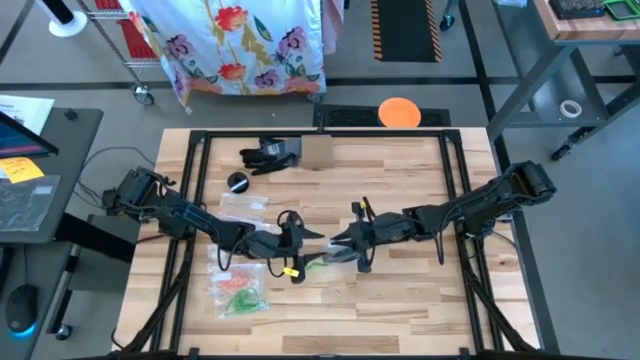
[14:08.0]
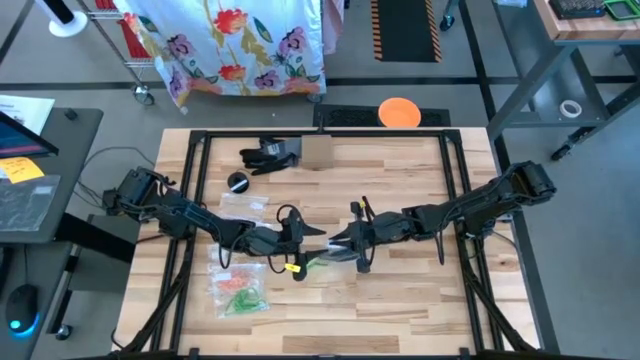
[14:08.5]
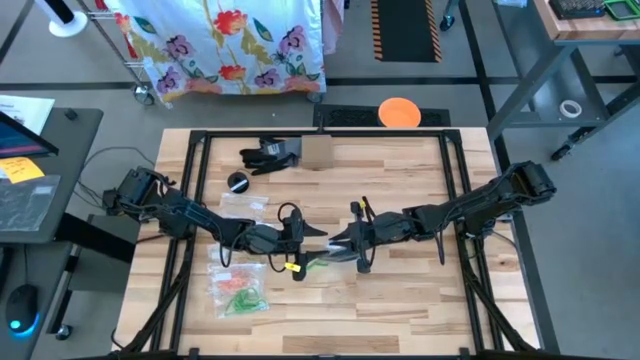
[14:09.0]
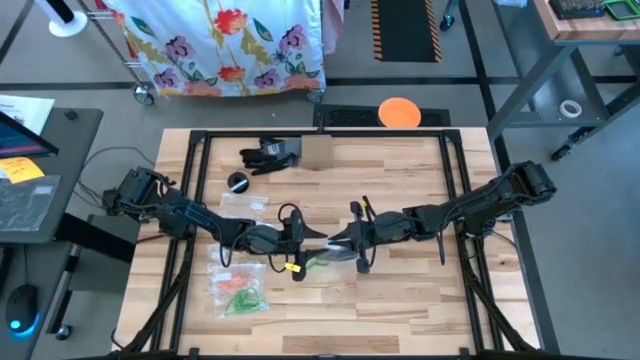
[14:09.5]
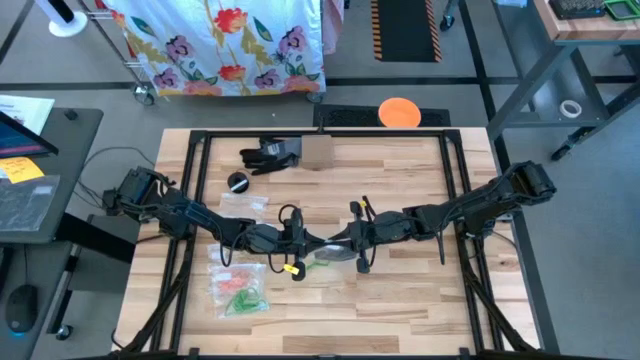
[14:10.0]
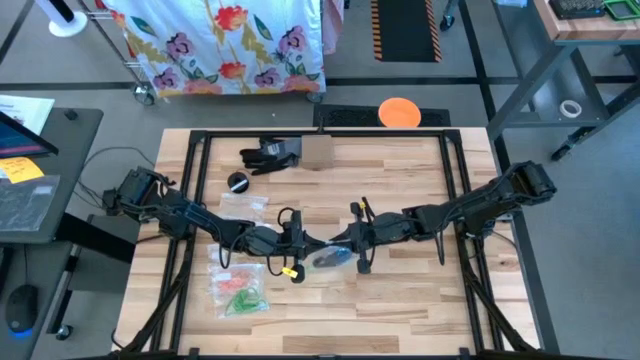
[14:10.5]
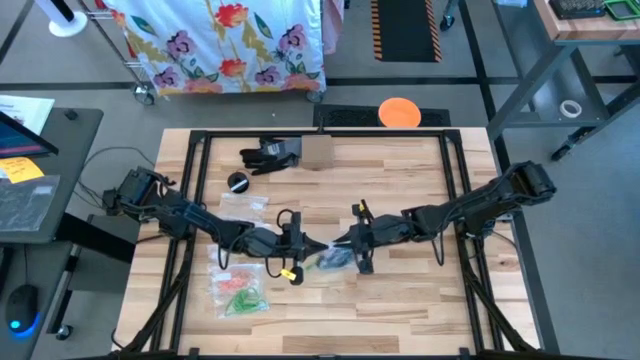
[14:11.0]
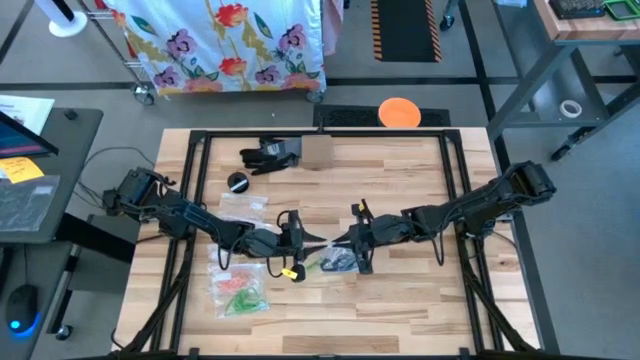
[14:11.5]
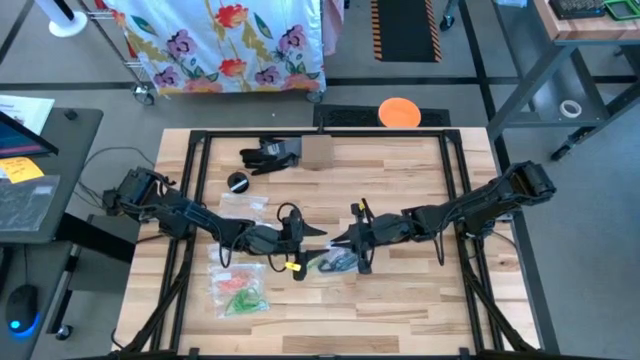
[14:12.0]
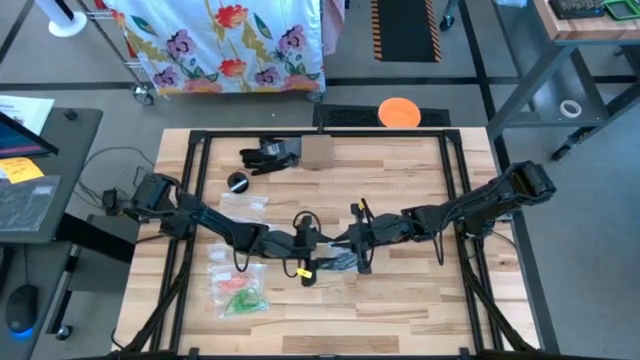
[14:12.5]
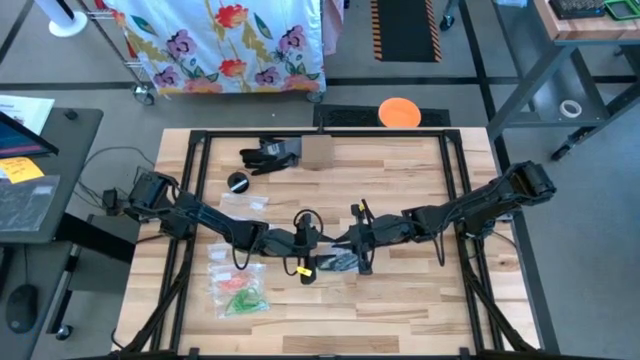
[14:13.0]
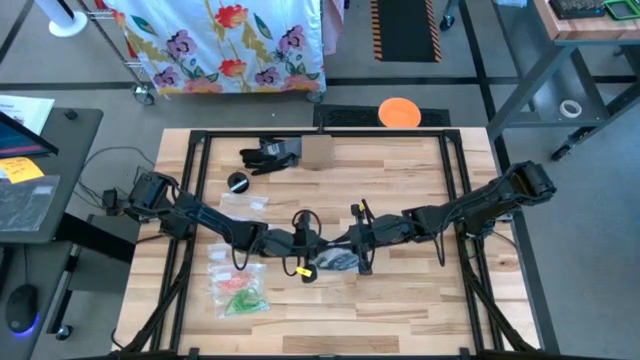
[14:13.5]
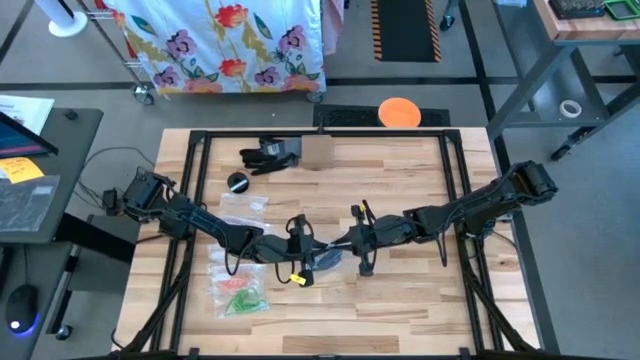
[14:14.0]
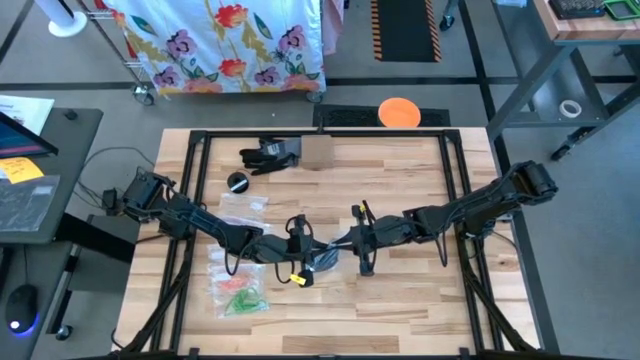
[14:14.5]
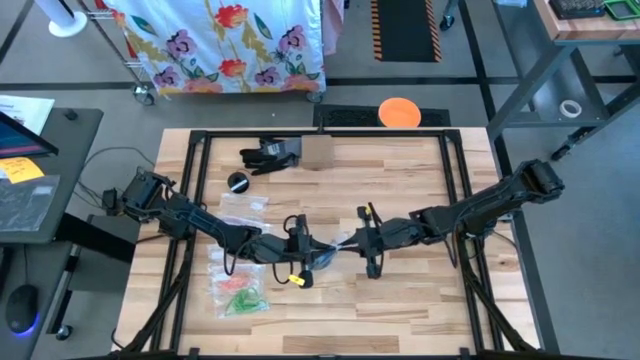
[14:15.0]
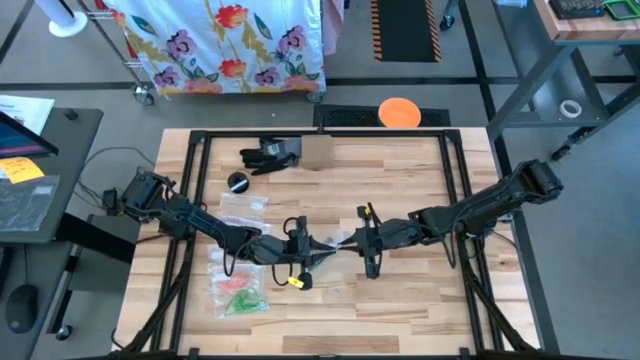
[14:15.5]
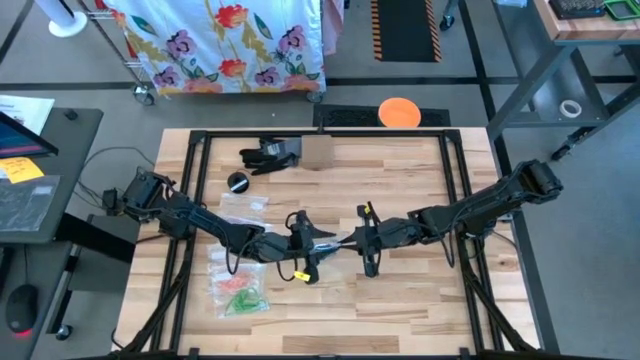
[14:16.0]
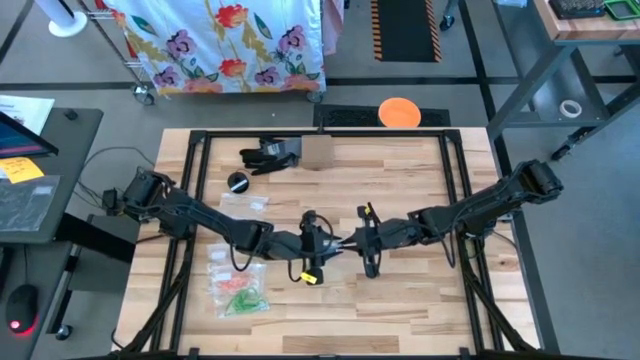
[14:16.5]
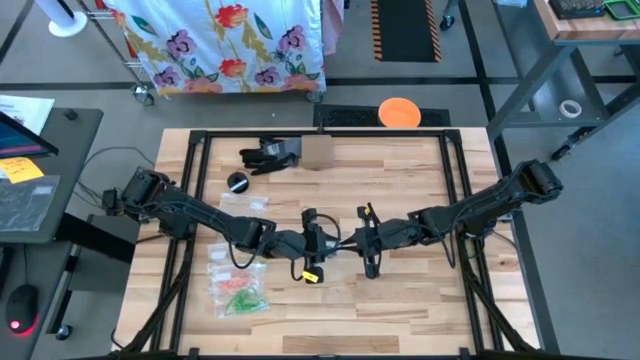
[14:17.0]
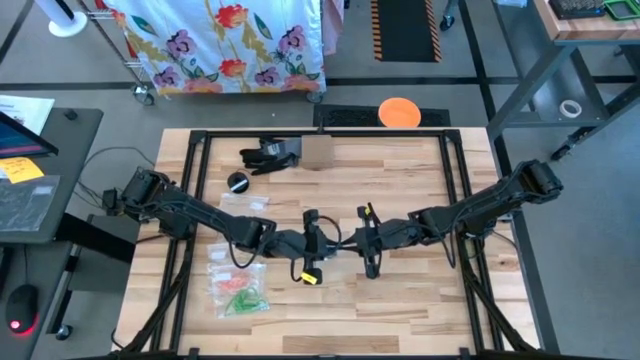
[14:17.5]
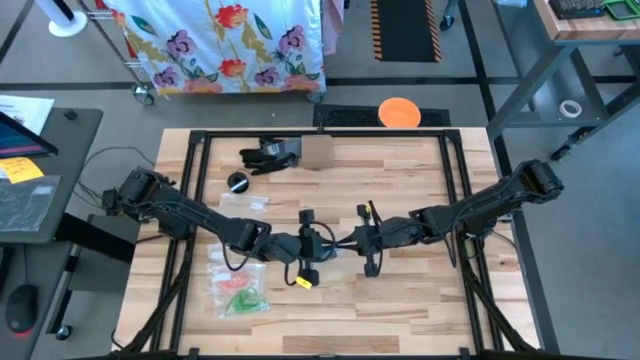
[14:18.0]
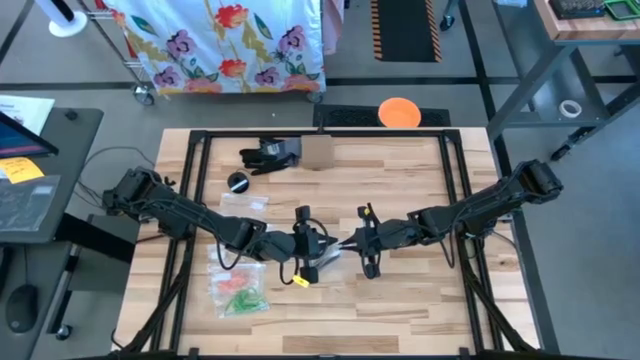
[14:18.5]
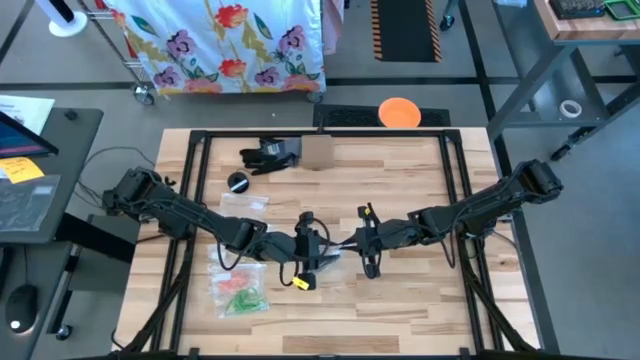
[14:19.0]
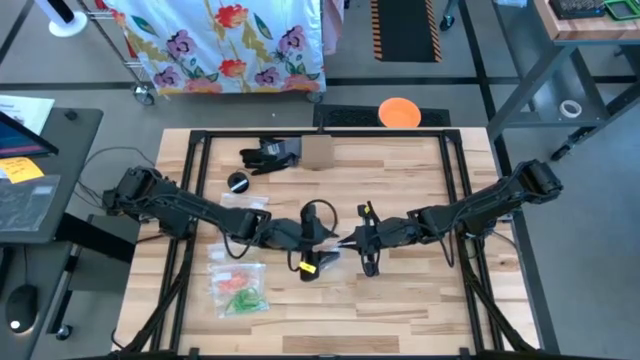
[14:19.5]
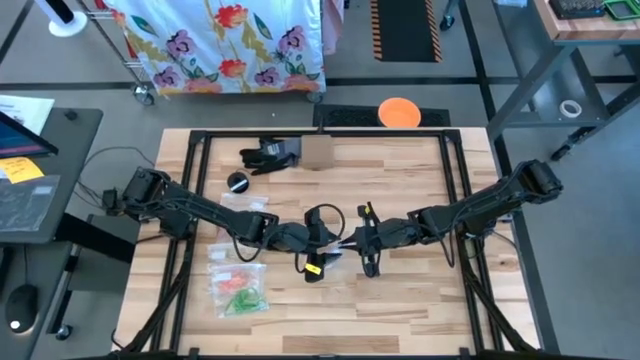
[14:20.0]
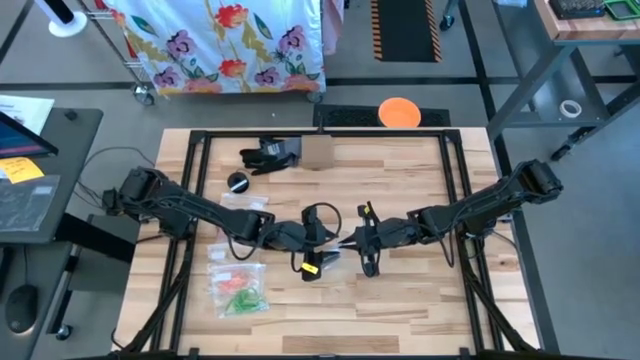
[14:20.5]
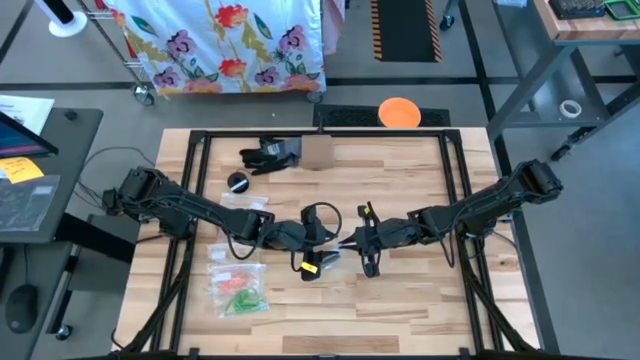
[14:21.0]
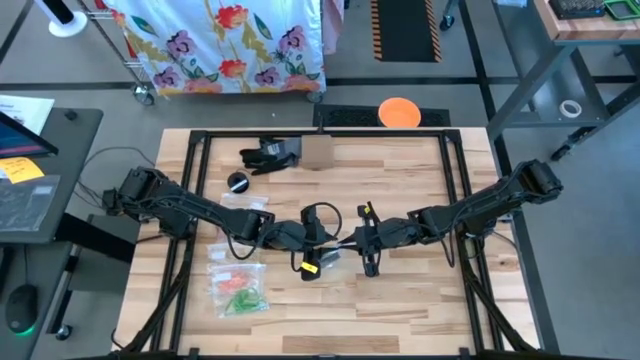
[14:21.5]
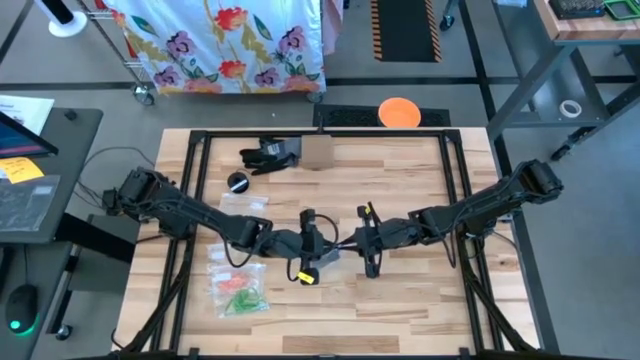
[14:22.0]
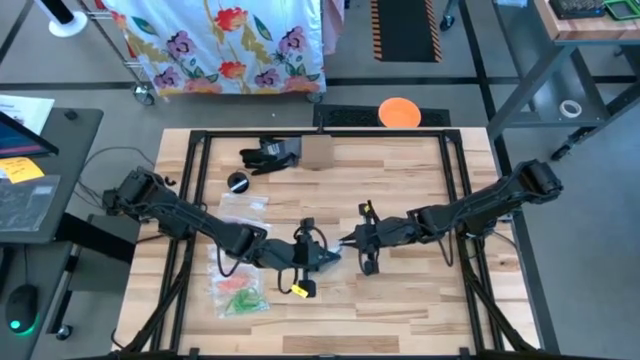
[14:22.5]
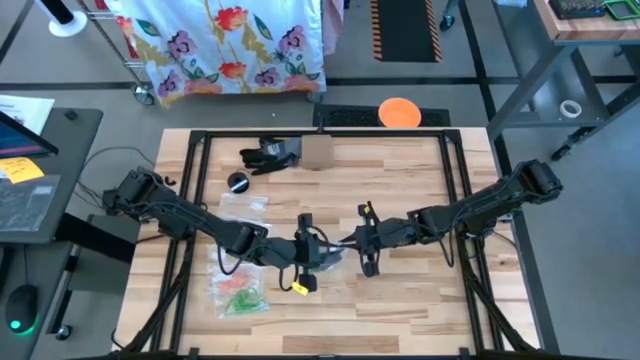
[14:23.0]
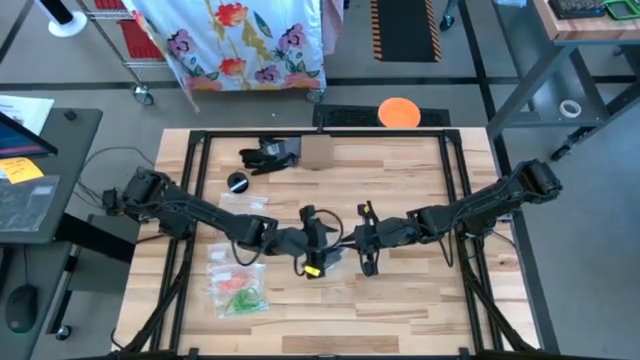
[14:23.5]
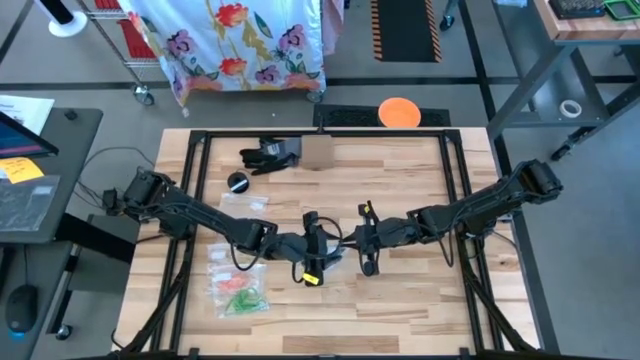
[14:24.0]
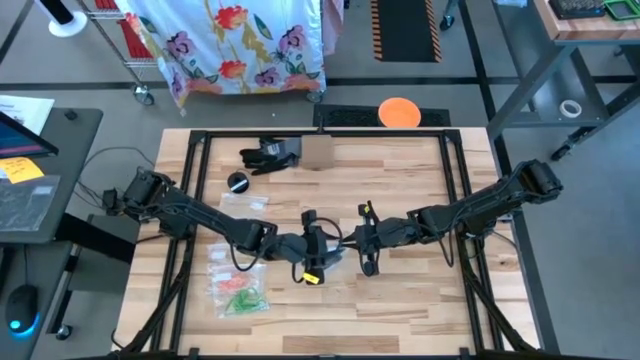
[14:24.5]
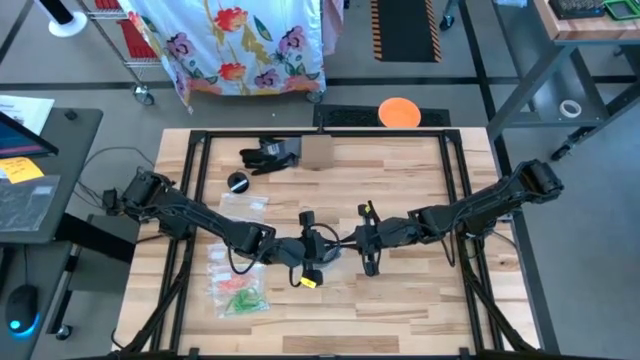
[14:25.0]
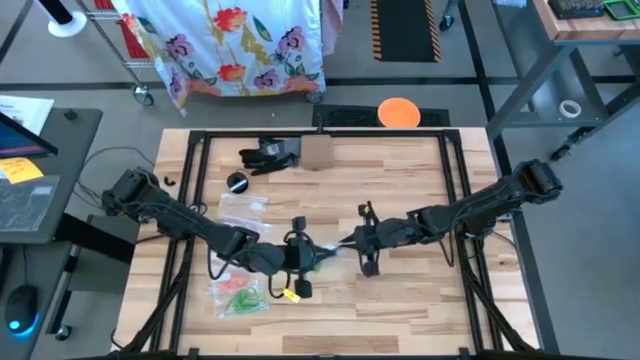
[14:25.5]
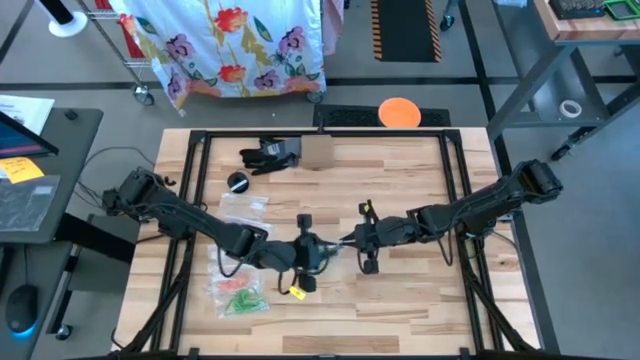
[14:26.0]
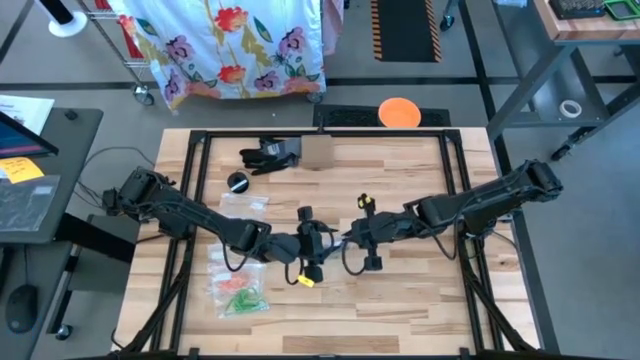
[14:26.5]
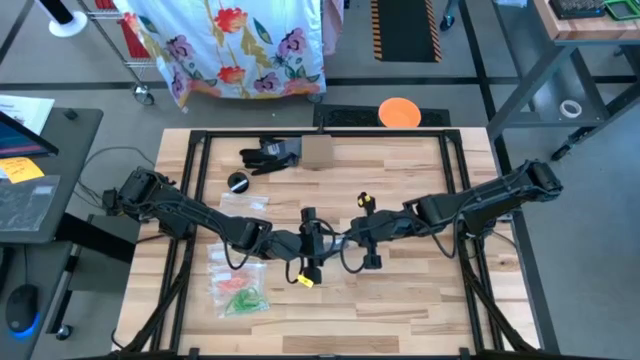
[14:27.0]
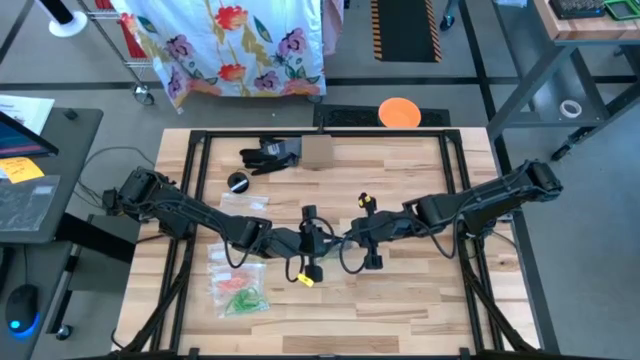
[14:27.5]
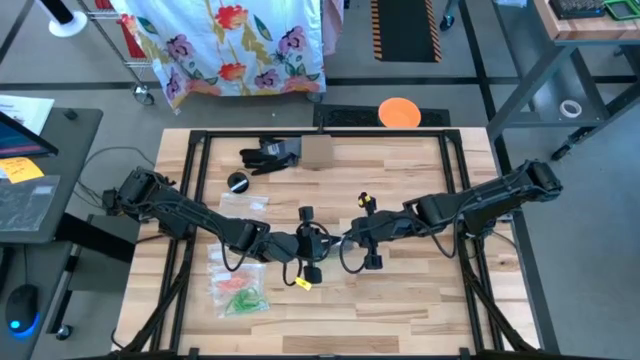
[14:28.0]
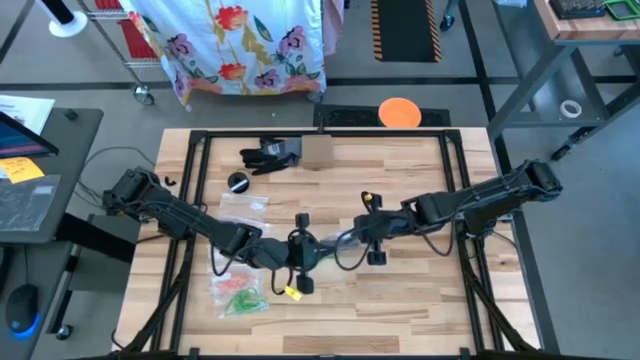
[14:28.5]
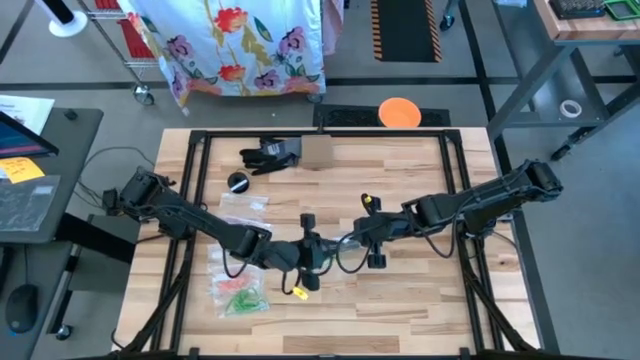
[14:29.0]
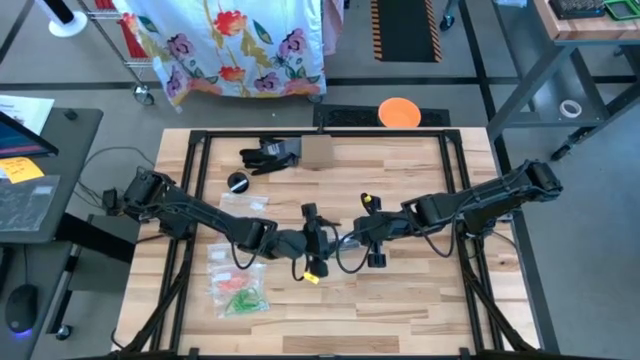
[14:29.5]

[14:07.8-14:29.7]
Task: Sort rubber bands
Close the transparent zip bag
